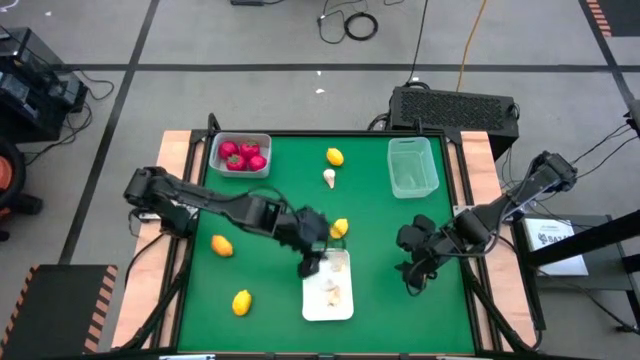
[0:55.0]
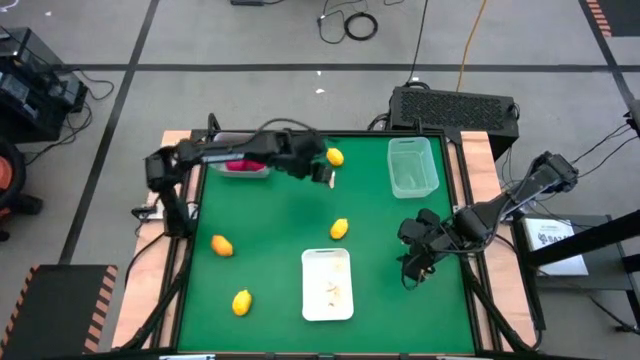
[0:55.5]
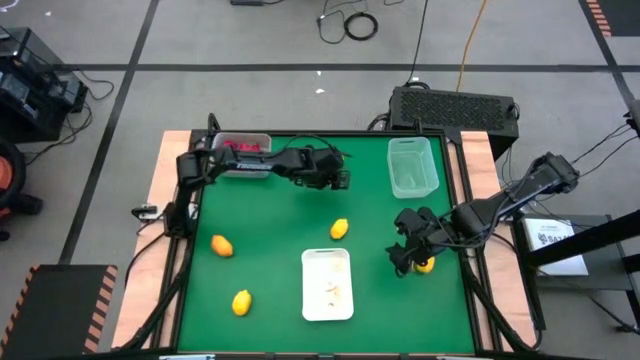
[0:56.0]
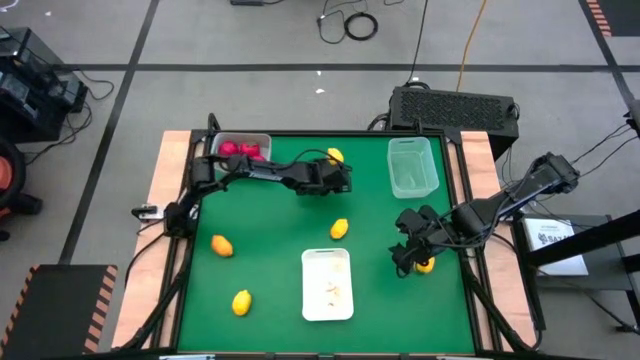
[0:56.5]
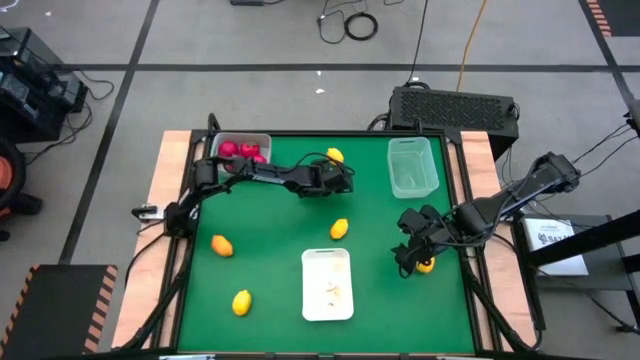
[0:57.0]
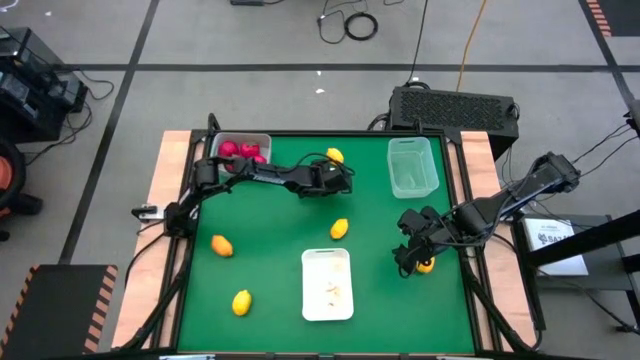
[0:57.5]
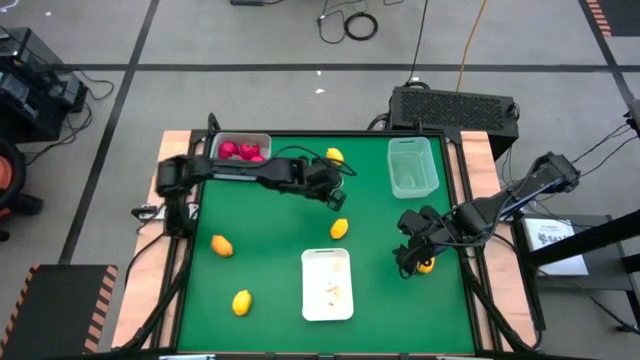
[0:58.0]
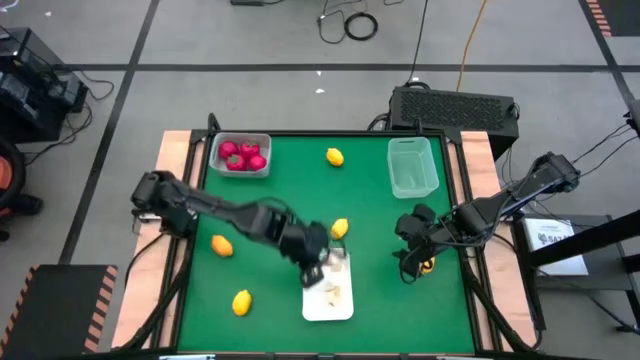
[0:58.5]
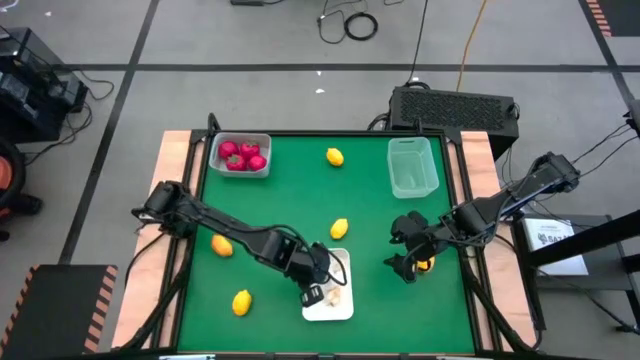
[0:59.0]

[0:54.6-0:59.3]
Task: Sort produce into baskets
Put the top garlic into the white bin

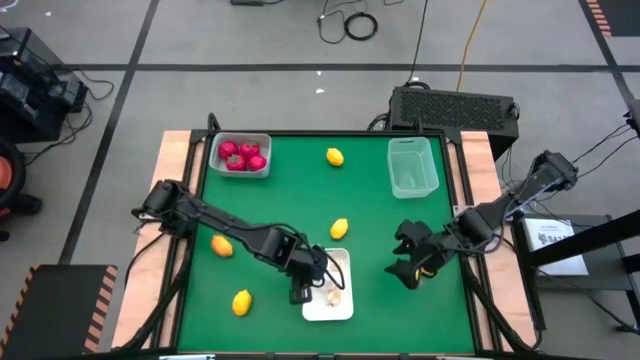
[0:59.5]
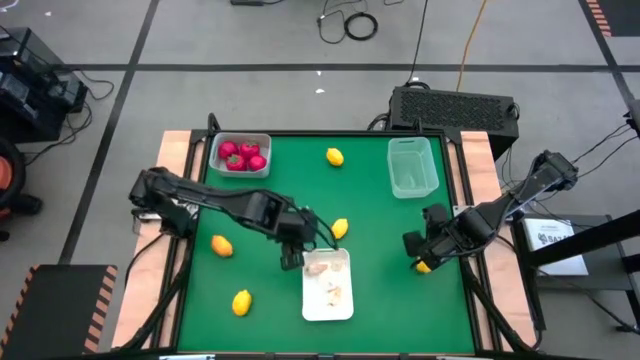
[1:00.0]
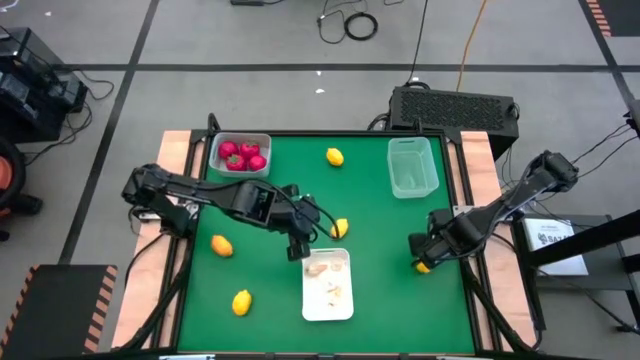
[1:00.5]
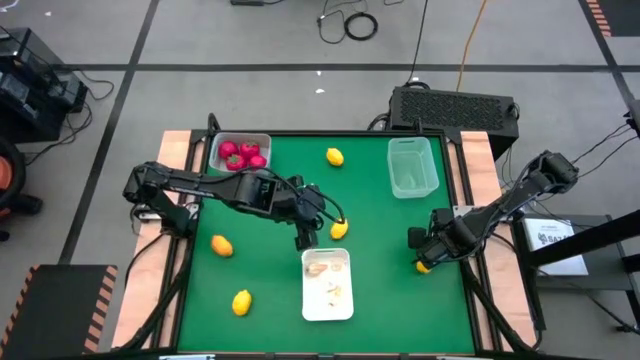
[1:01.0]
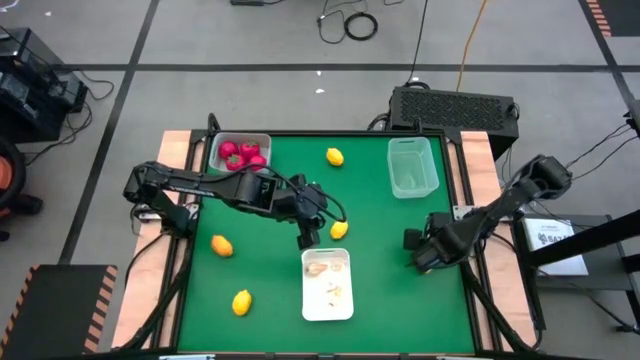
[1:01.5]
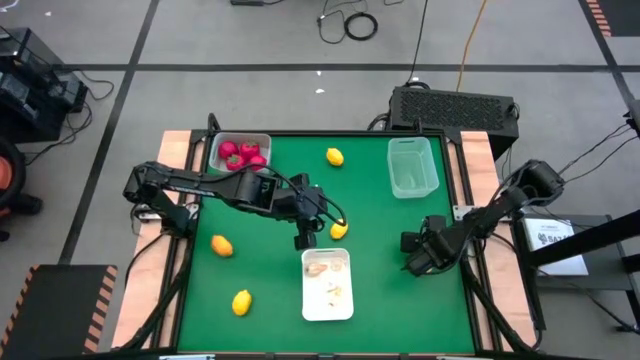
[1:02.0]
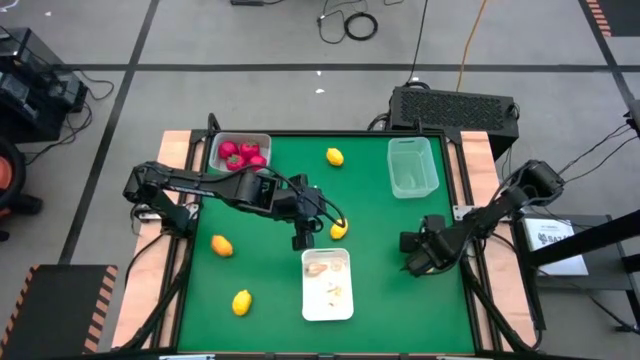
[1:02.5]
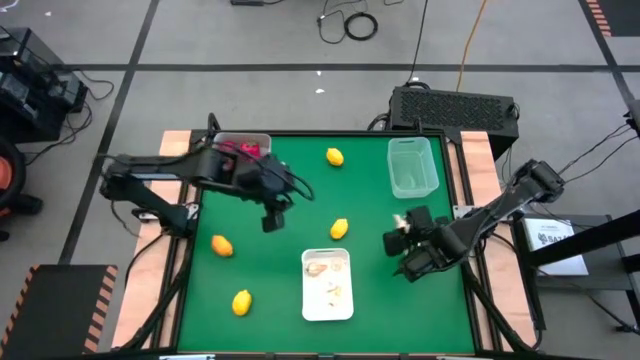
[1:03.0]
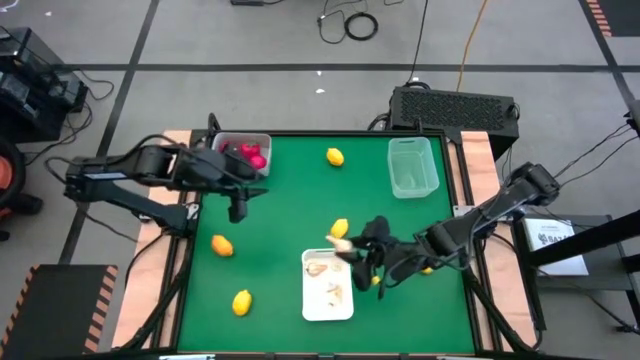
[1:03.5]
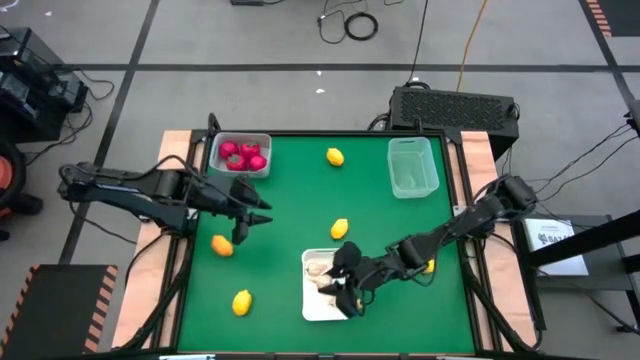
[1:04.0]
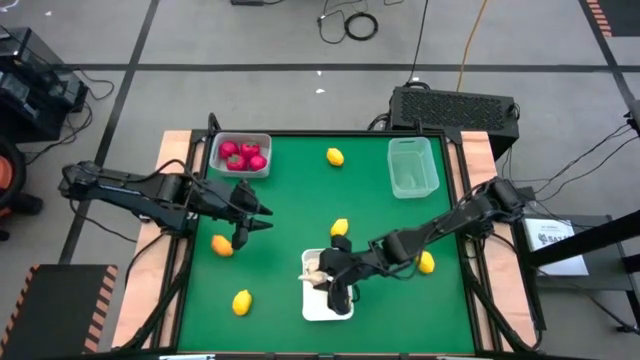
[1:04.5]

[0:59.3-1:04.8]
Put the garlic into the white bin

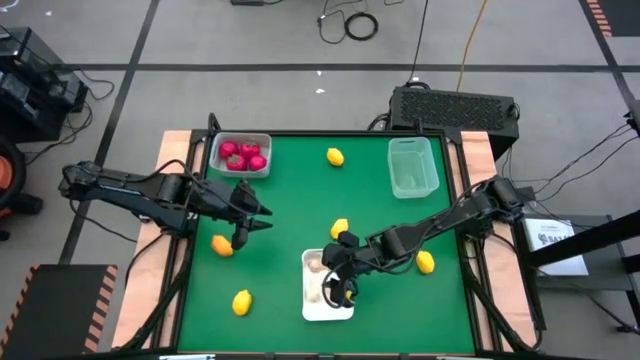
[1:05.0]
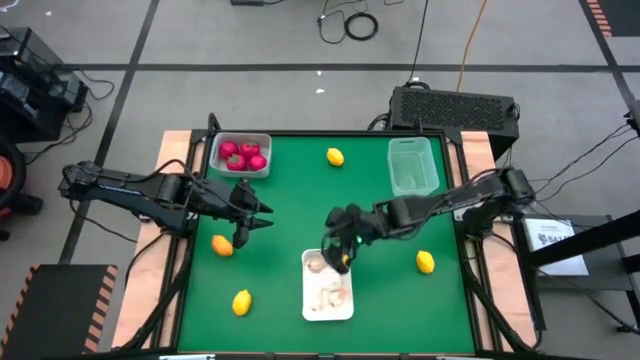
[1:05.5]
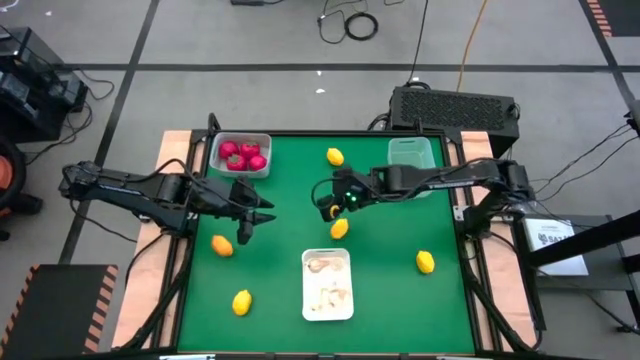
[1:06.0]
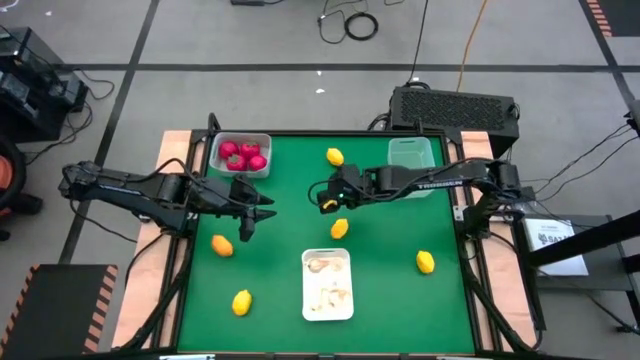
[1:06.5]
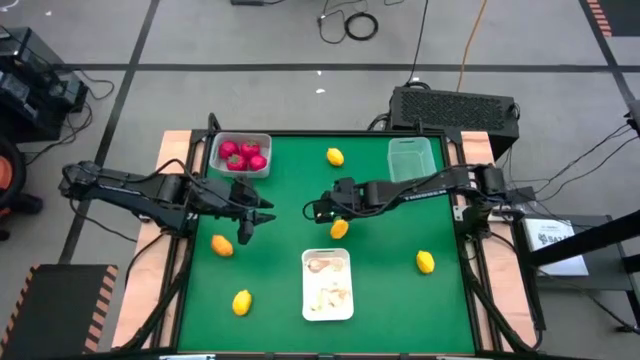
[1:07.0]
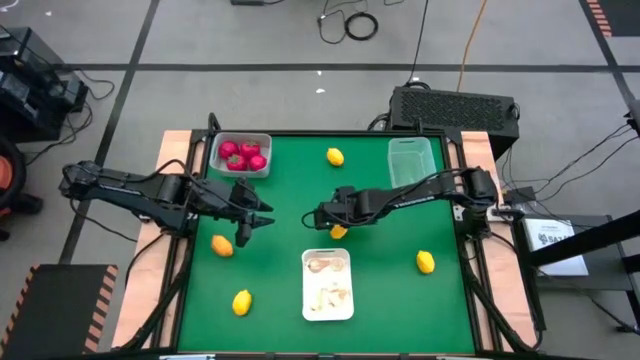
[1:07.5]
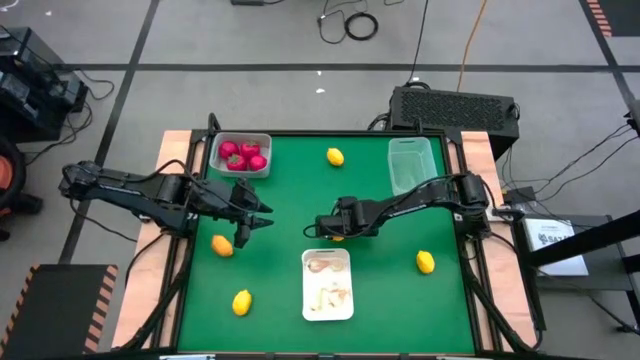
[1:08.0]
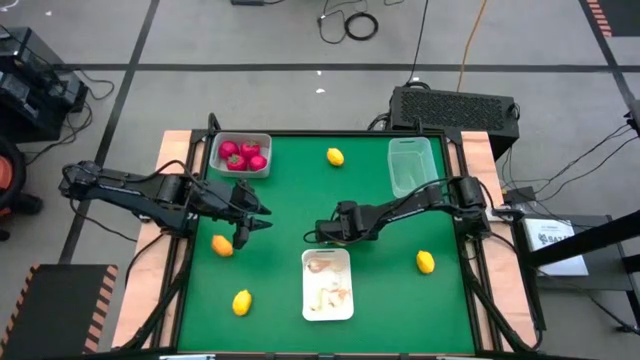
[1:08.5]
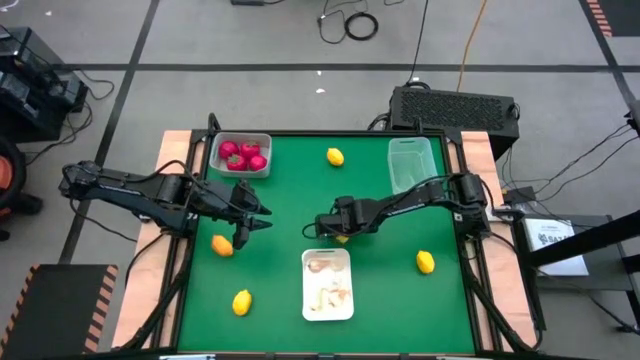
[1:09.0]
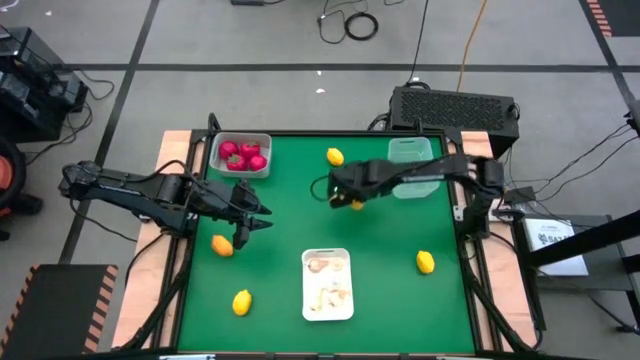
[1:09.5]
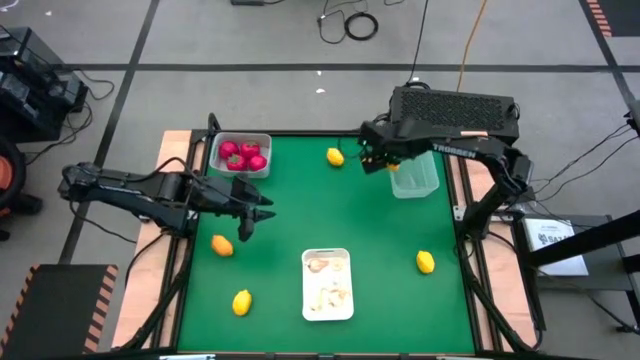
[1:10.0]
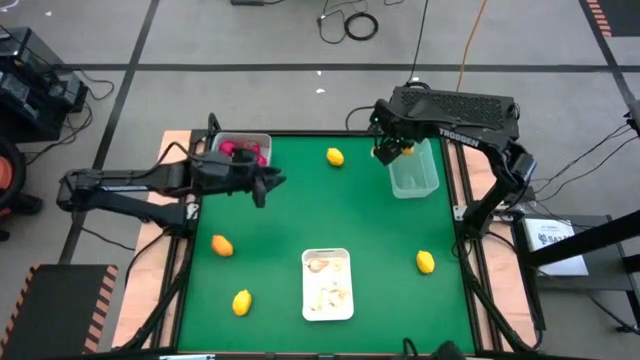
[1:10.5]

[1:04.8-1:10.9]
Put the center lemon into the transparent bin

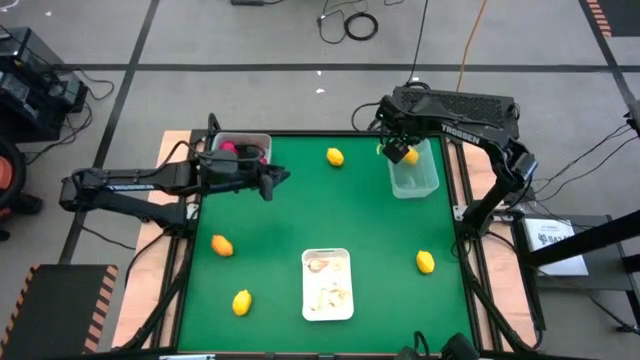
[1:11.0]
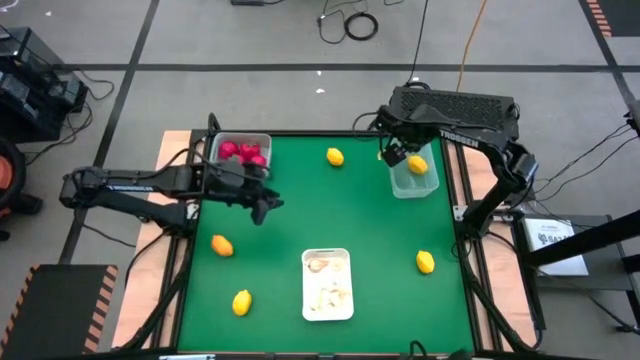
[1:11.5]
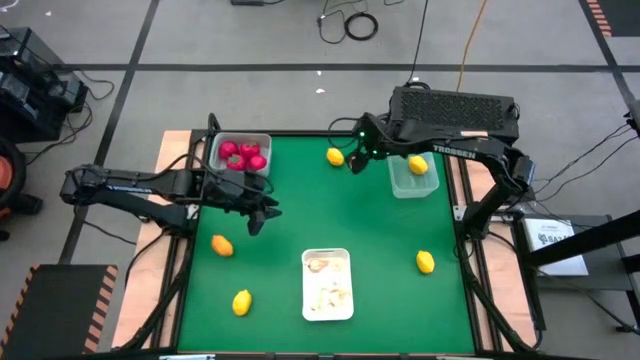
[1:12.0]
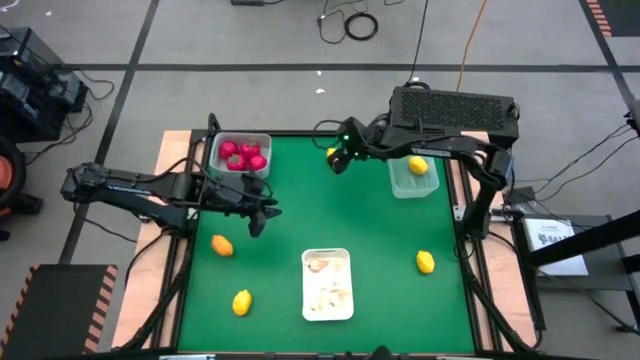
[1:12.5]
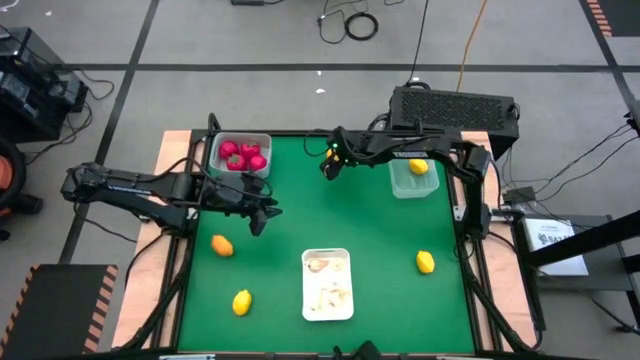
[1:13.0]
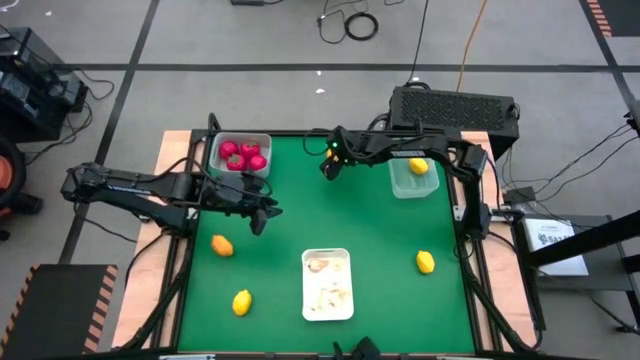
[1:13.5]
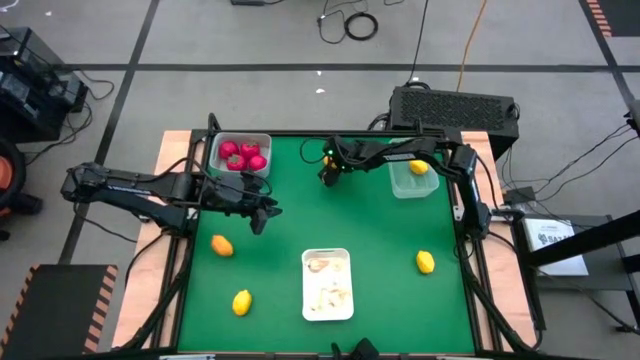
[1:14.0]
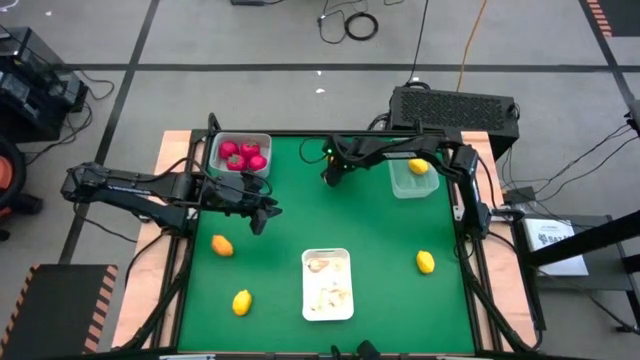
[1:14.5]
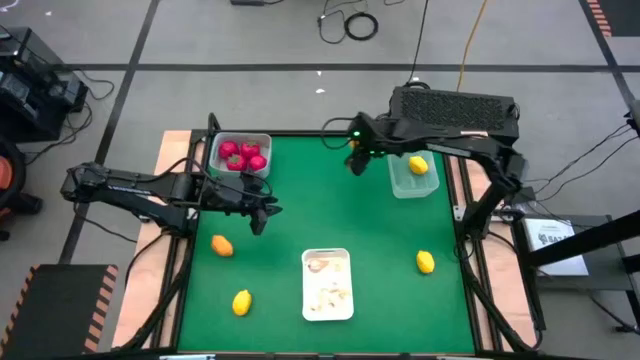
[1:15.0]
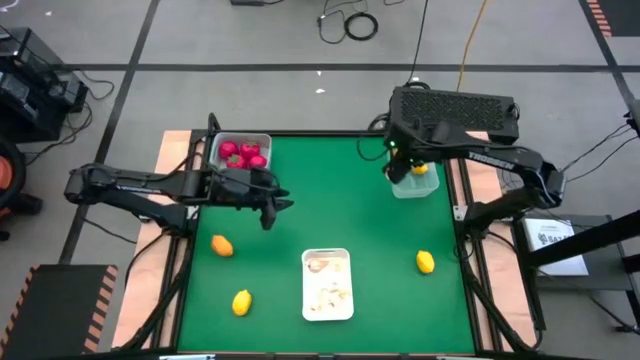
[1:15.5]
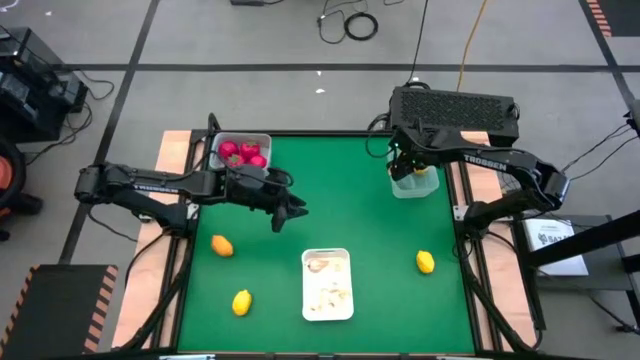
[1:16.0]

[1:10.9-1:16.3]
Put the top center lemon into the transparent bin
